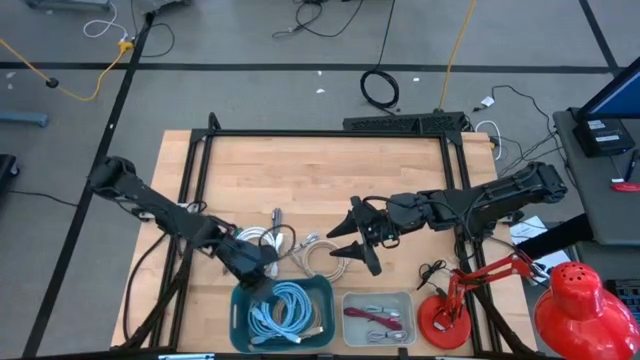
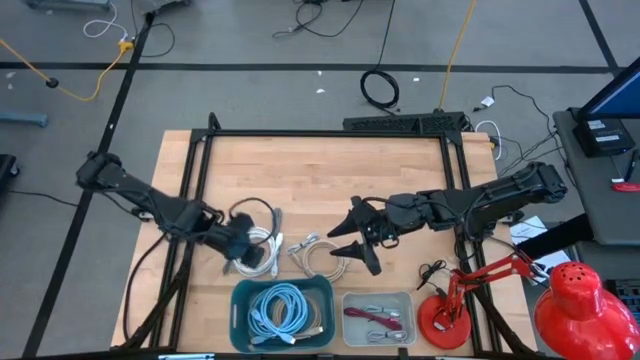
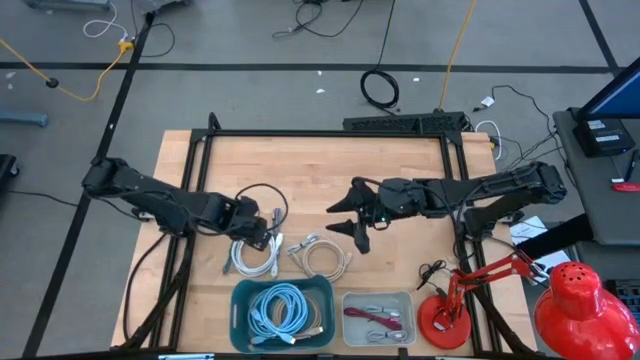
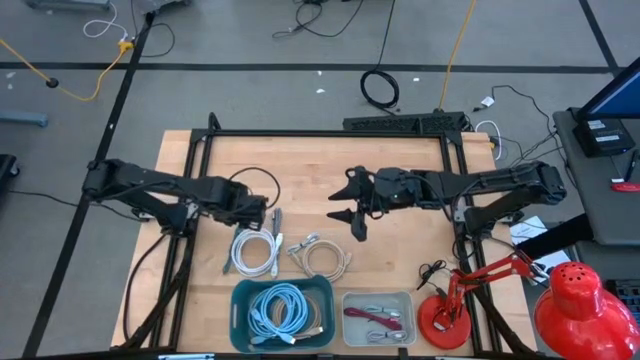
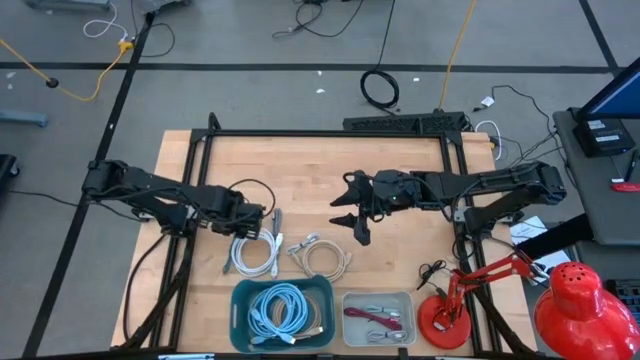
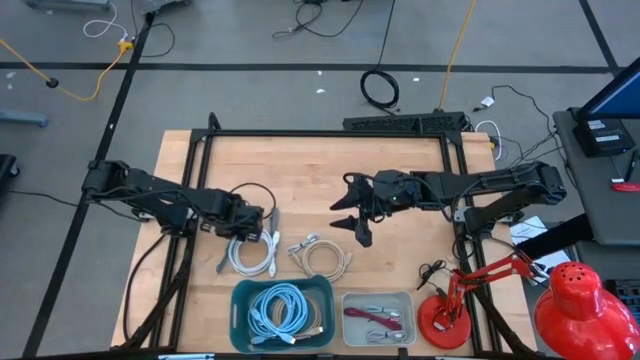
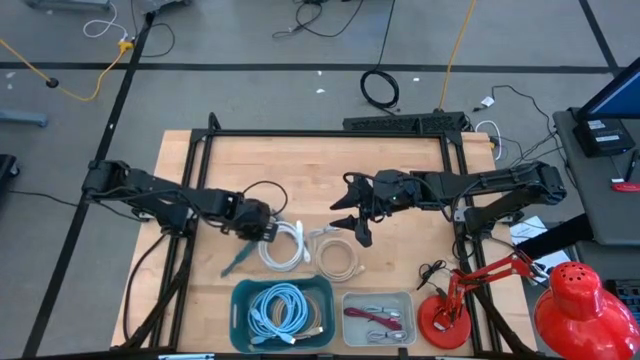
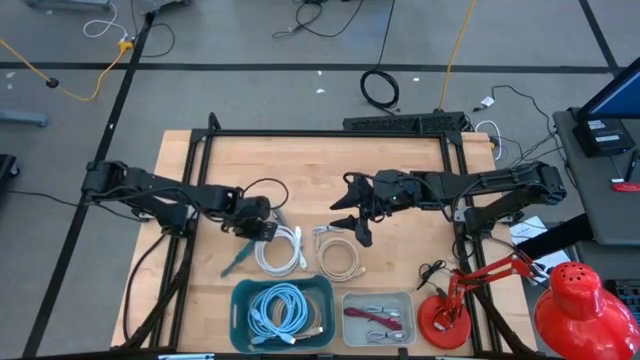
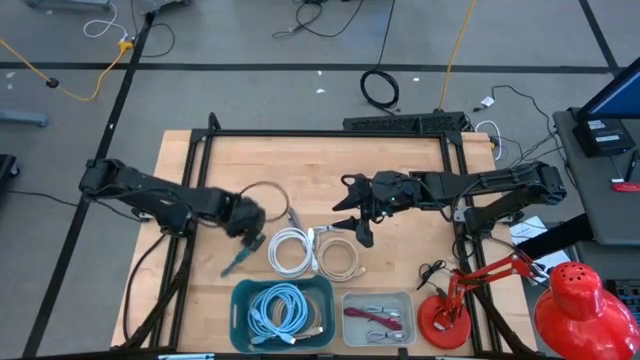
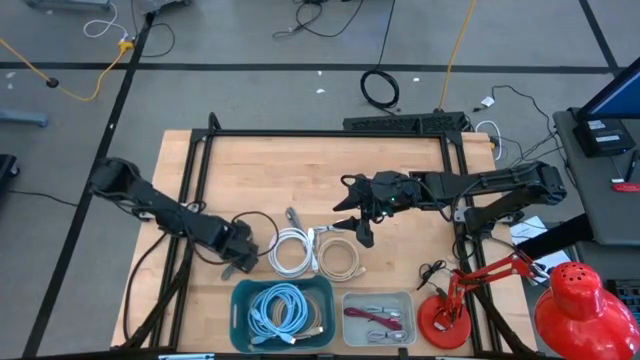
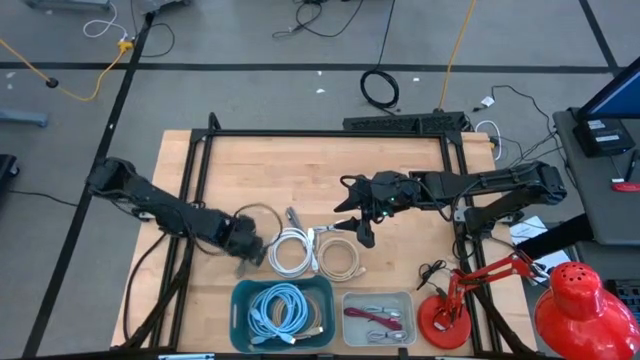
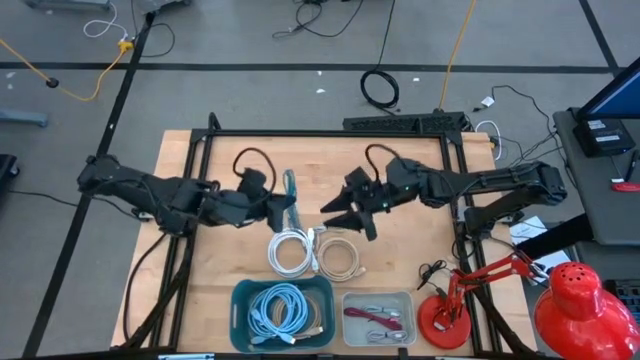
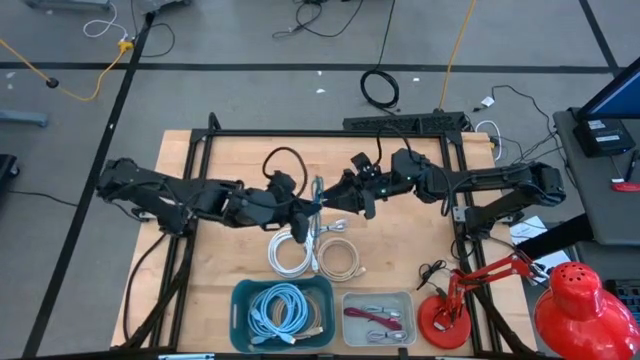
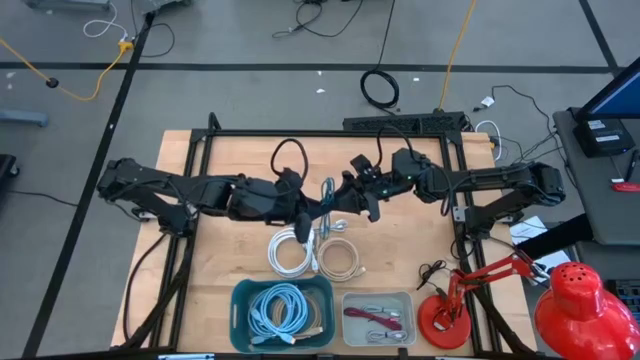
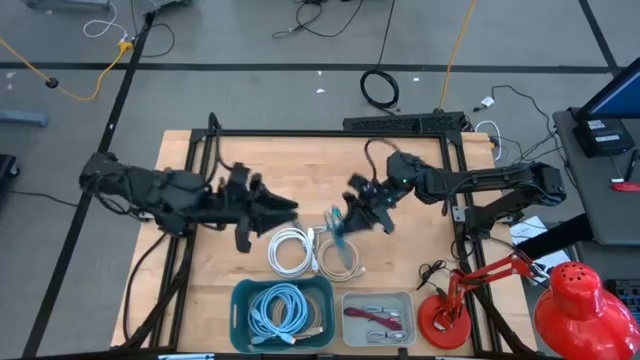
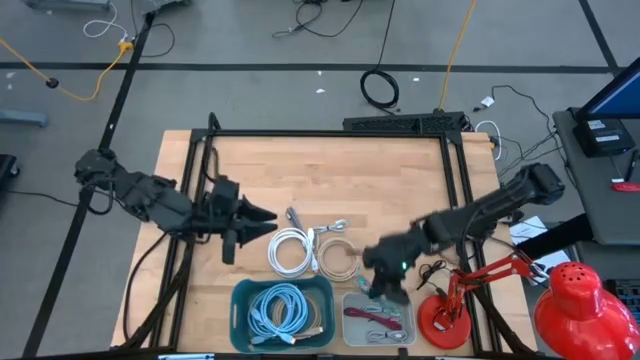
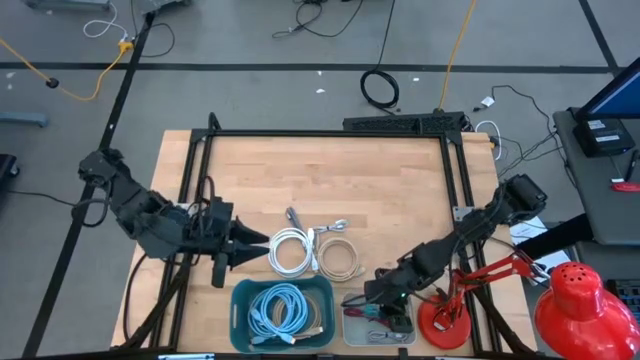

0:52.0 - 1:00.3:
Task: Pick & Place USB Port
Put the small dark blue charger cable into the grey bin

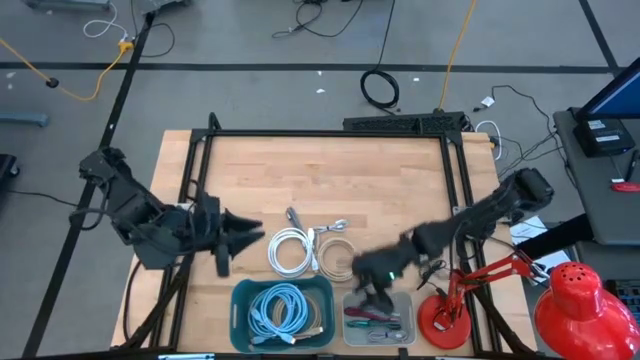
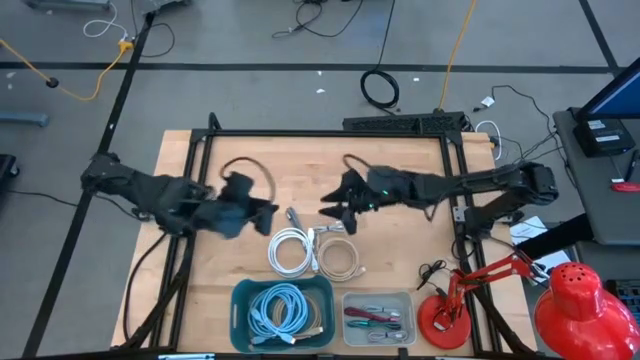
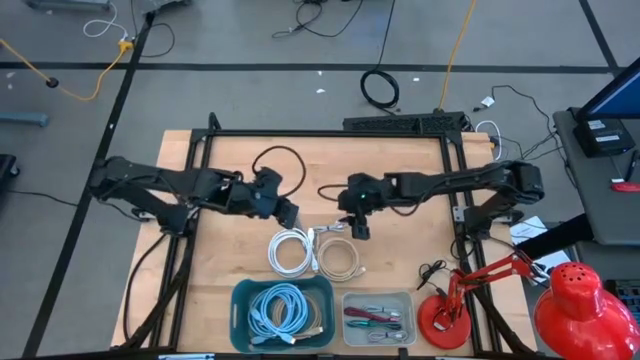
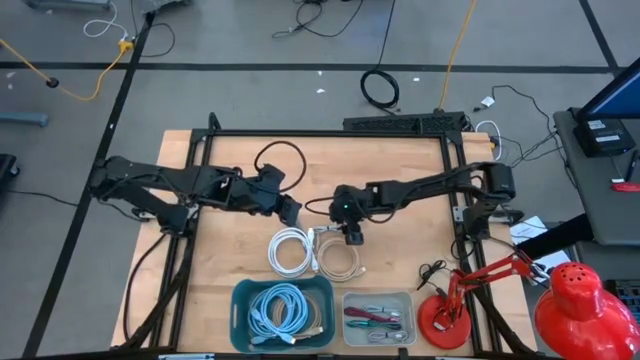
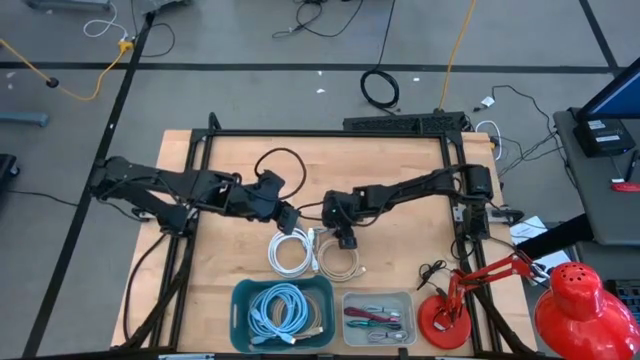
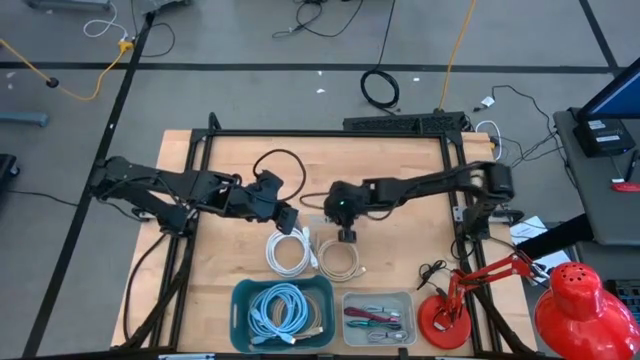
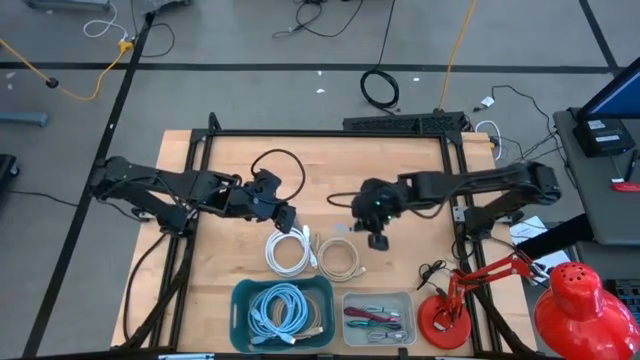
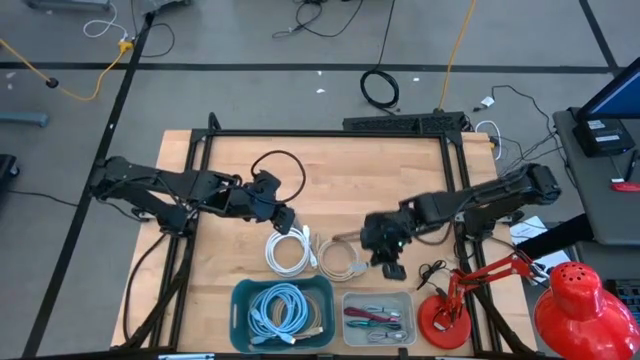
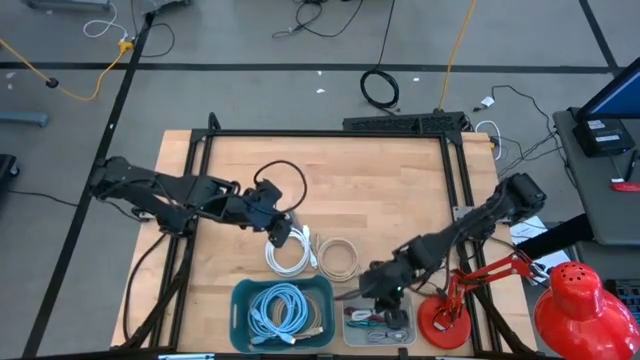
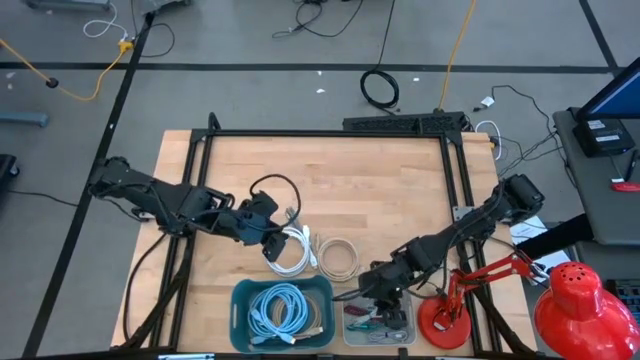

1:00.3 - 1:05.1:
Put small the grey charger cable into the grey bin

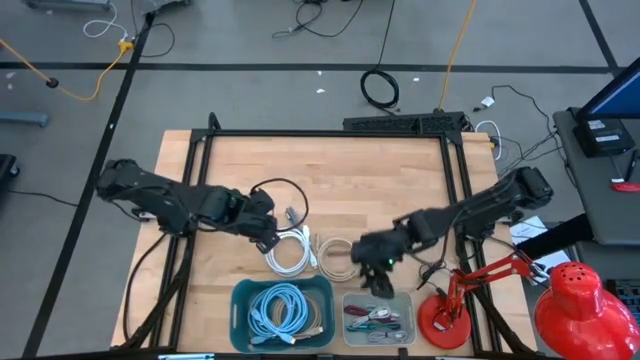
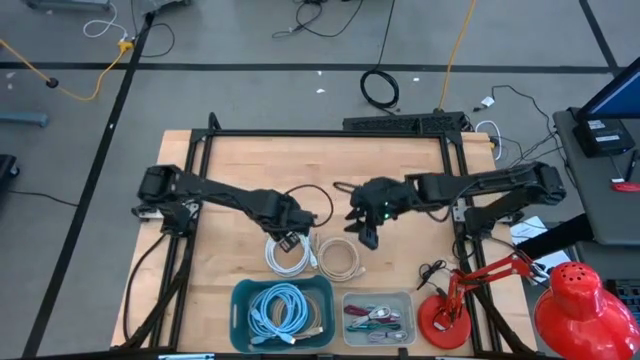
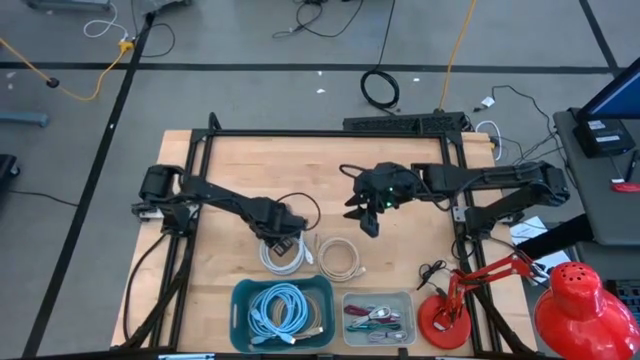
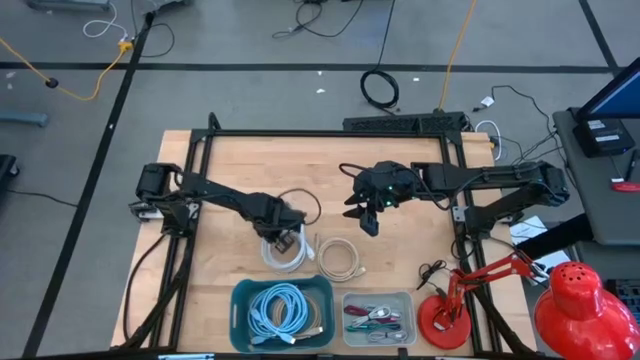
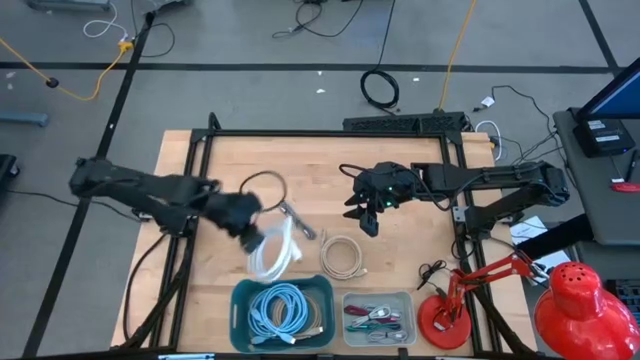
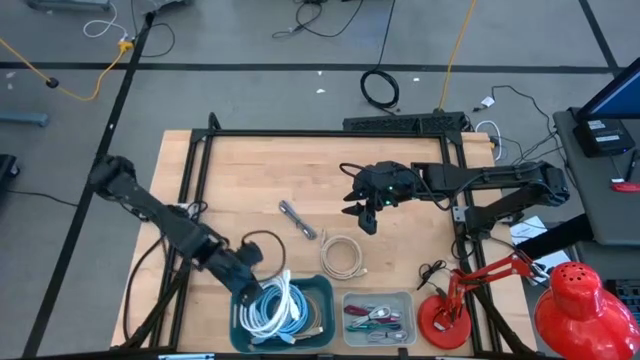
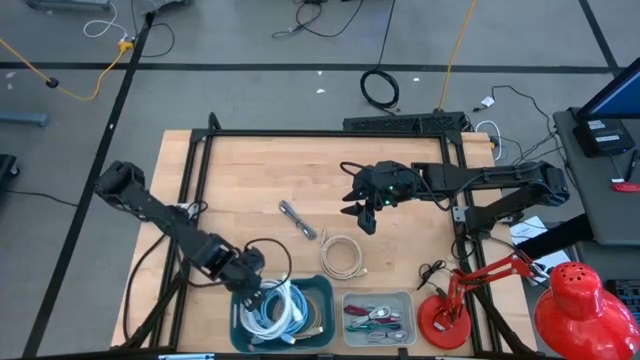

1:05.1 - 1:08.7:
Put the large white charger cable into the dark blue bin

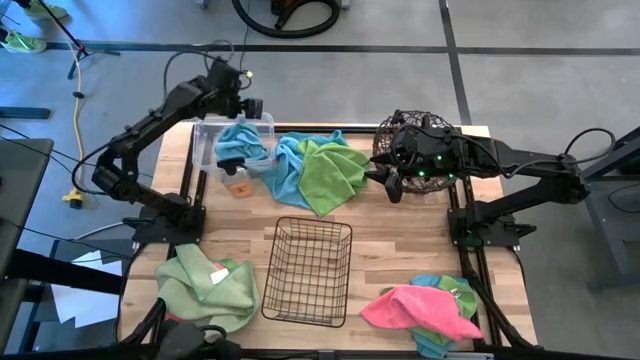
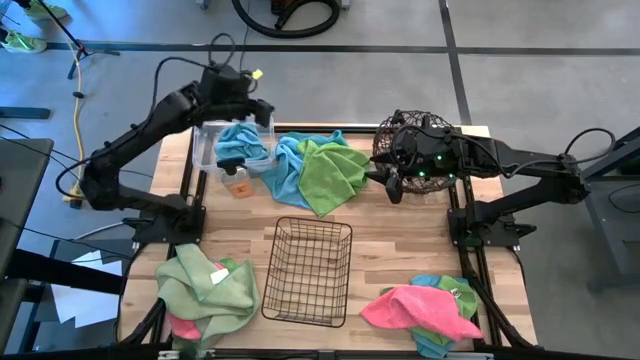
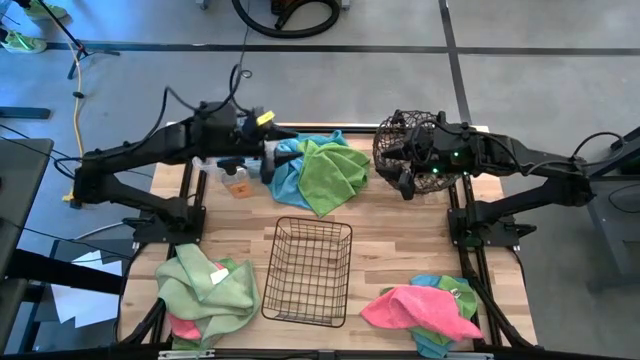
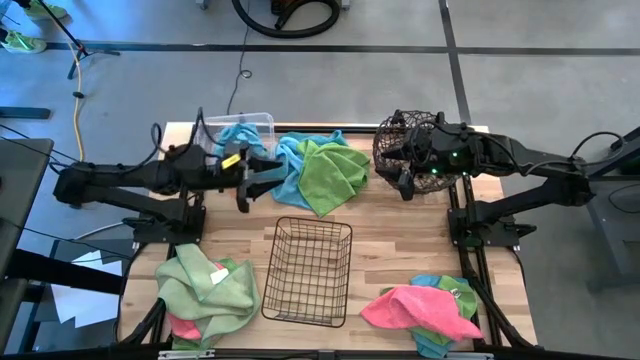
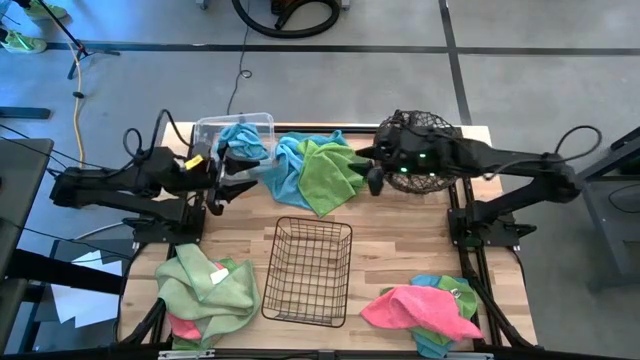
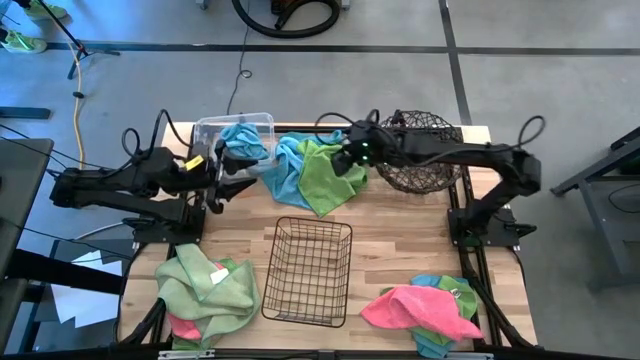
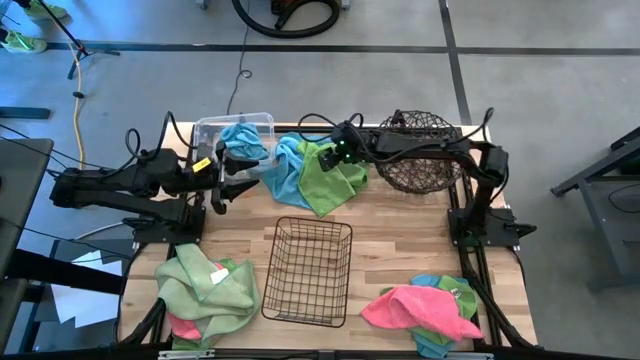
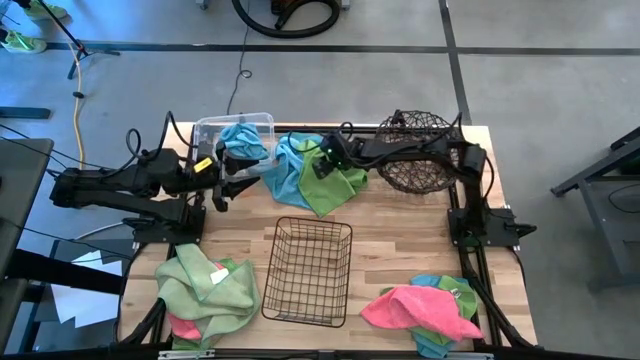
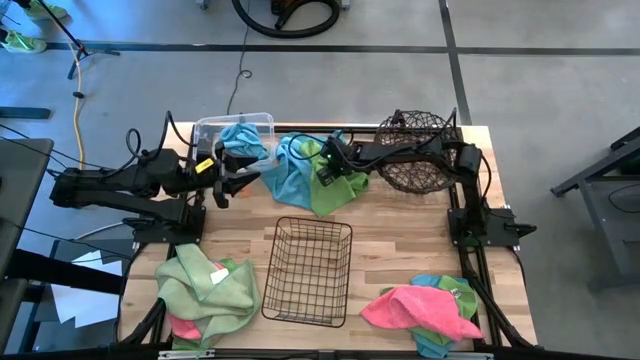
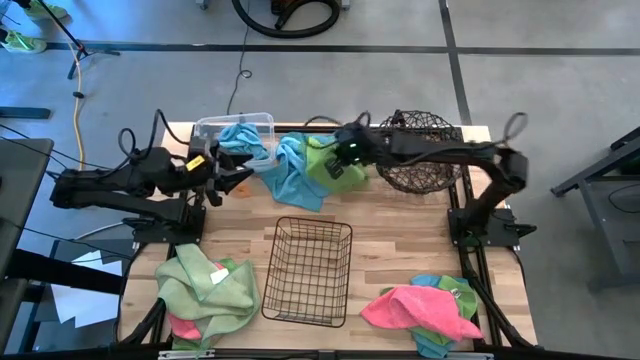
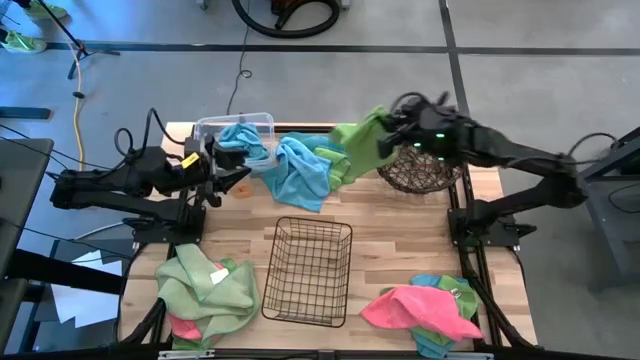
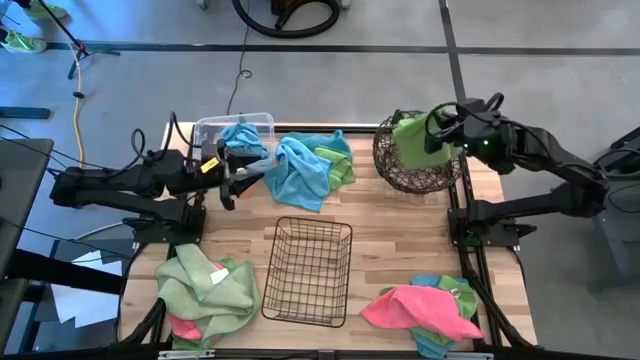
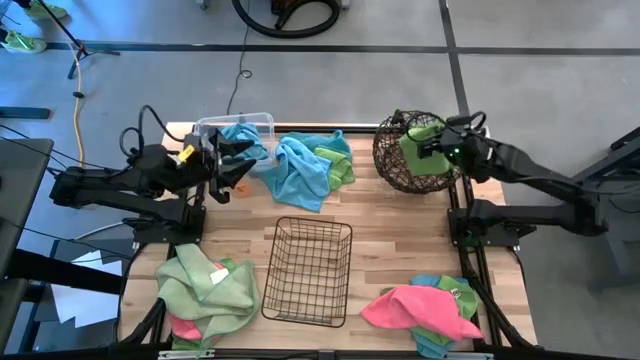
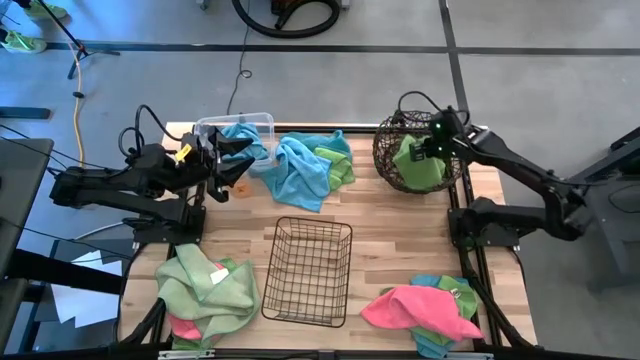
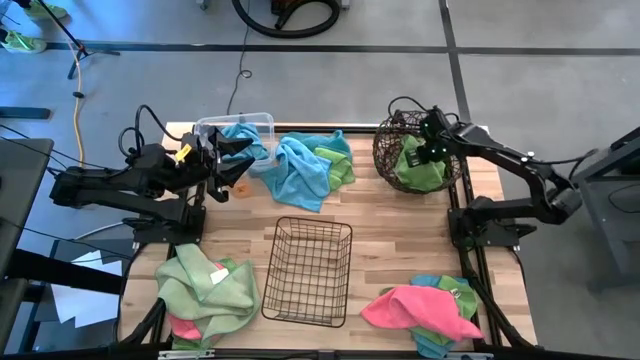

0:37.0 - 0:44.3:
Task: Sort microfiber towel by color & place in baskets
Put the green microfiber towel into the round black wire basket
